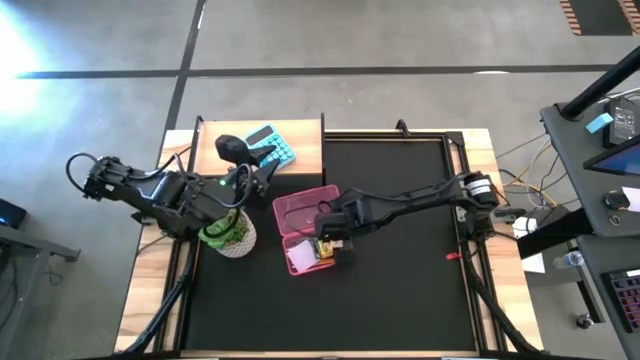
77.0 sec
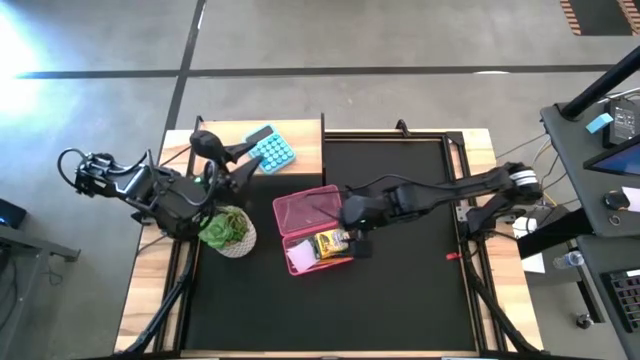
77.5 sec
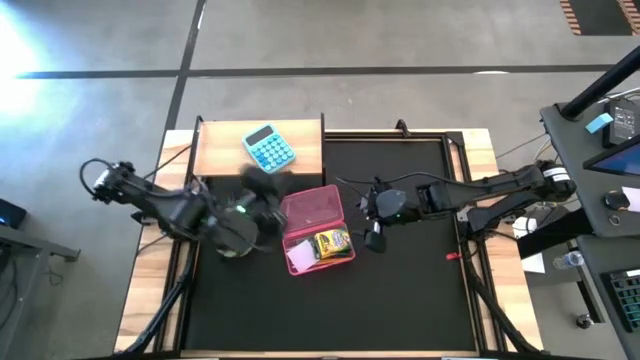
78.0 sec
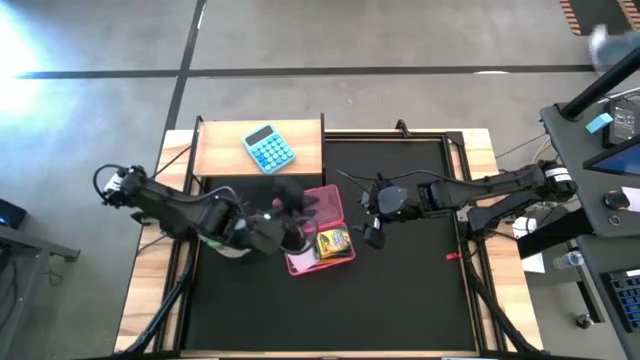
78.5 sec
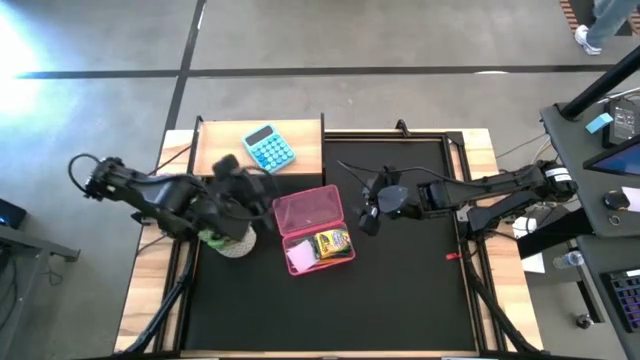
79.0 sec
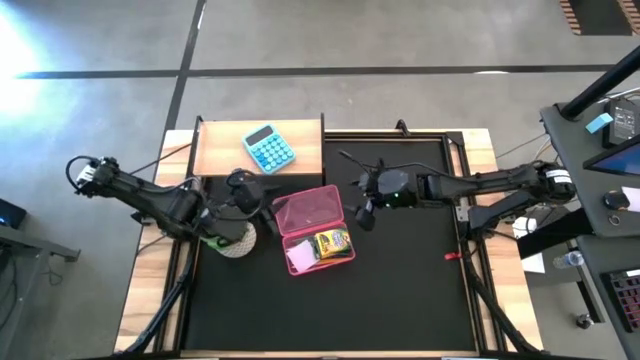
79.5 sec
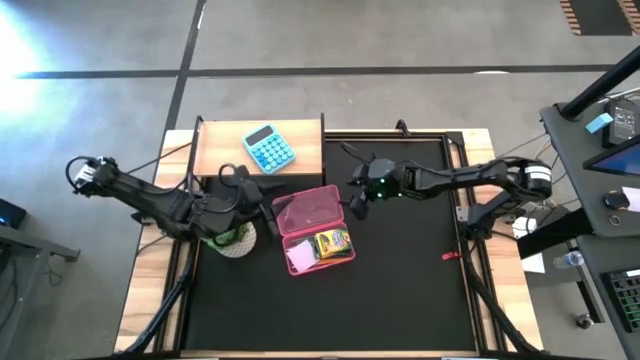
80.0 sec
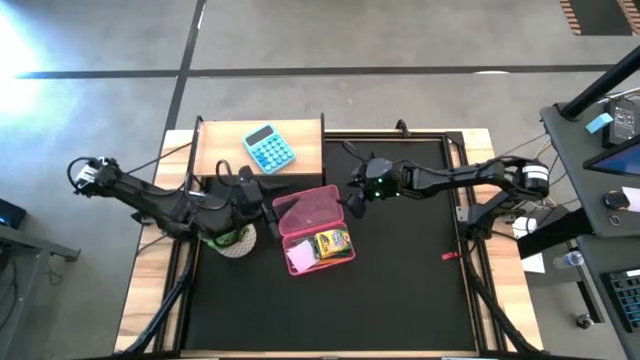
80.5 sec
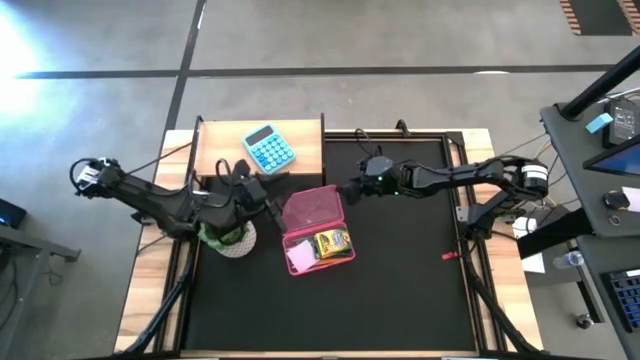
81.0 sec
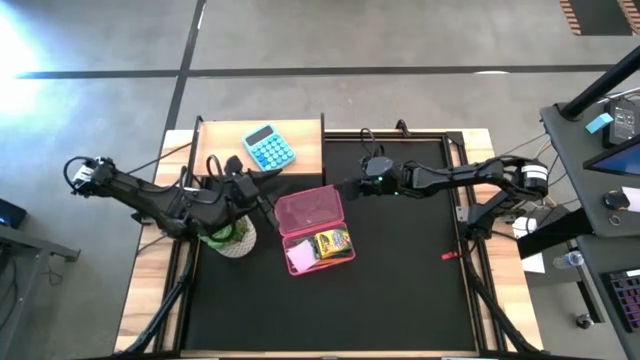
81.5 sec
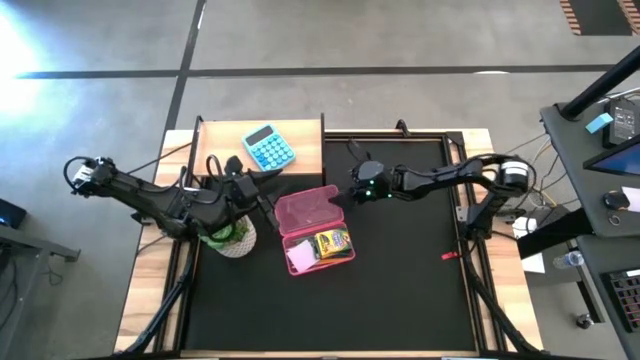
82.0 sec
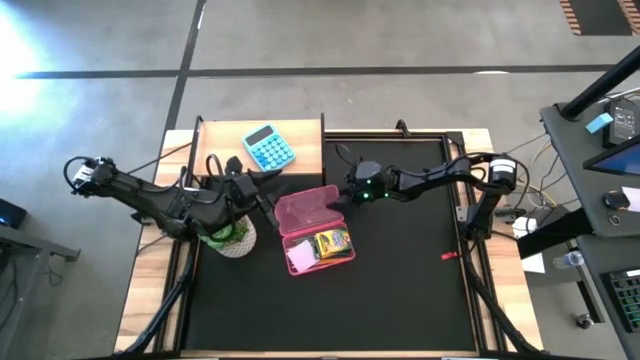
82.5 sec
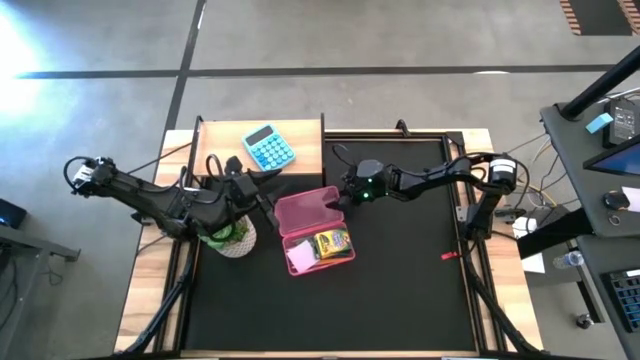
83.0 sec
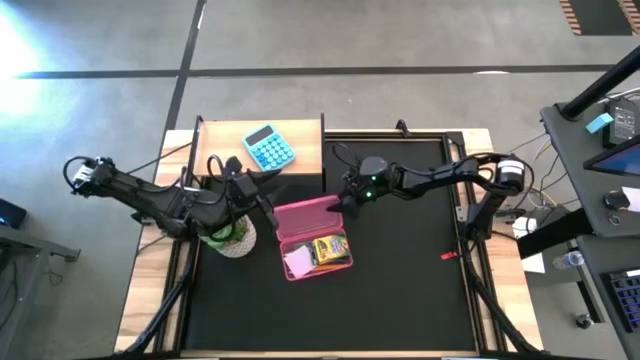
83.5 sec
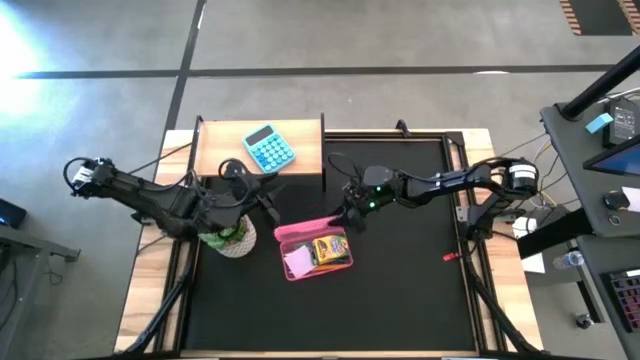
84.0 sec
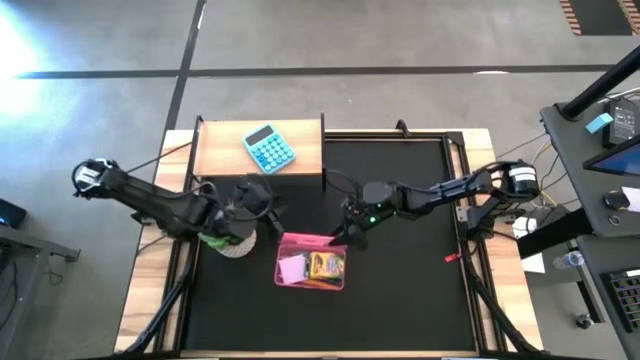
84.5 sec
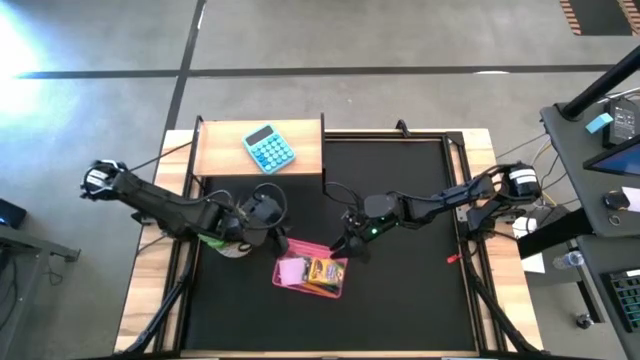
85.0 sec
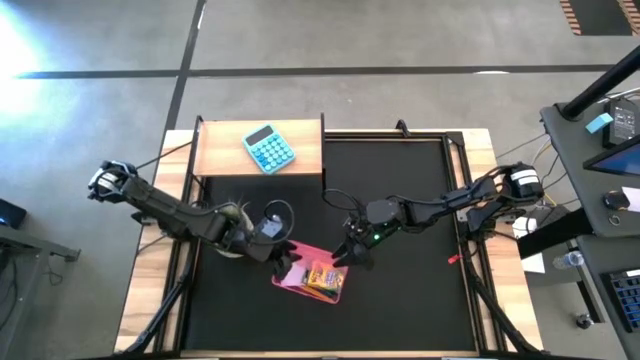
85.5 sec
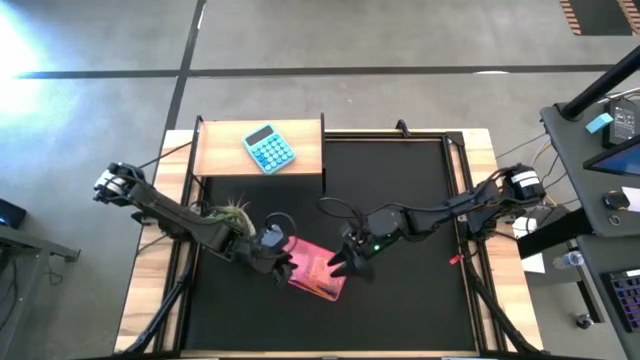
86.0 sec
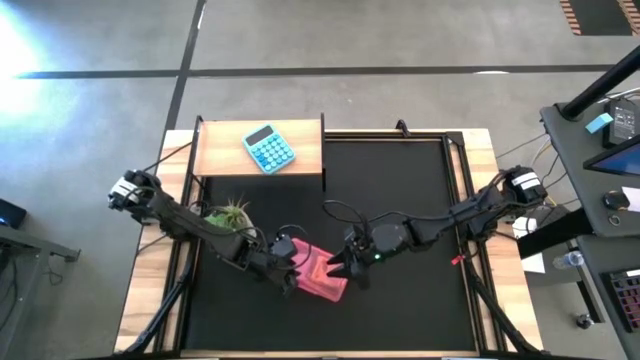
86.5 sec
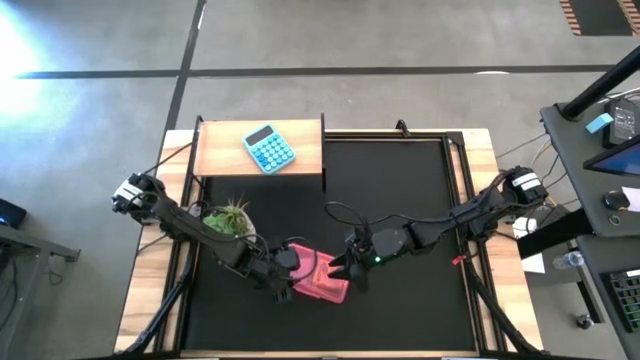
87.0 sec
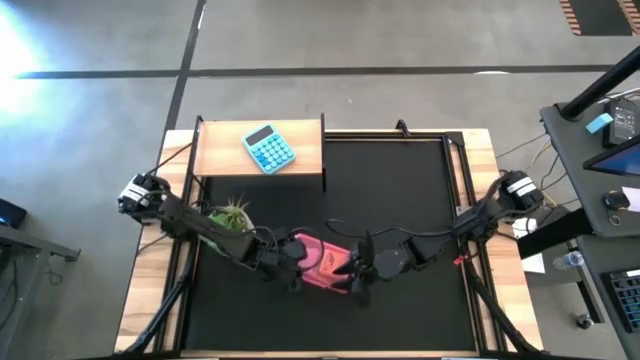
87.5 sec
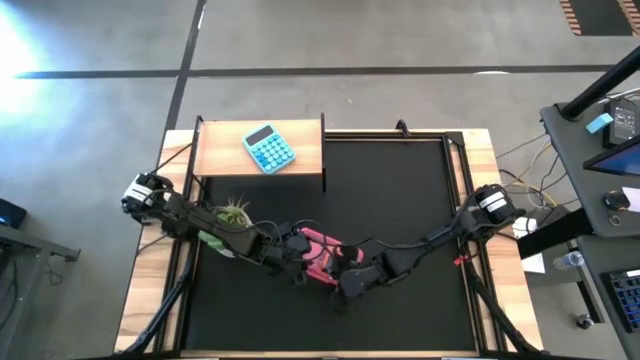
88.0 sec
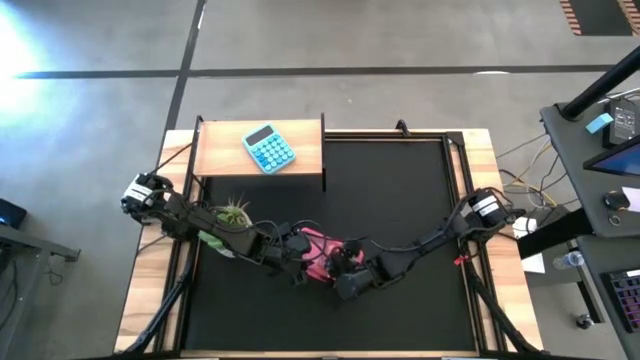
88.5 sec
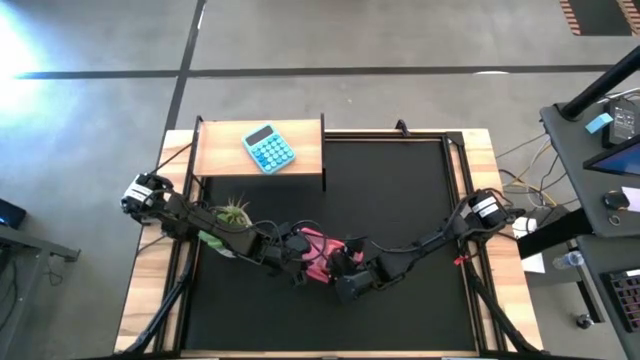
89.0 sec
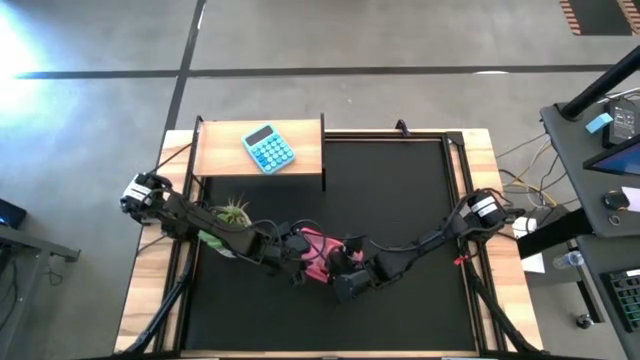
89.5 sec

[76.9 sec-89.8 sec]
Task: Pack school essentials
Close the pink box

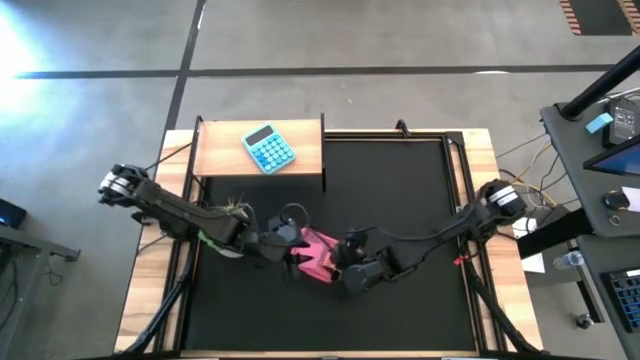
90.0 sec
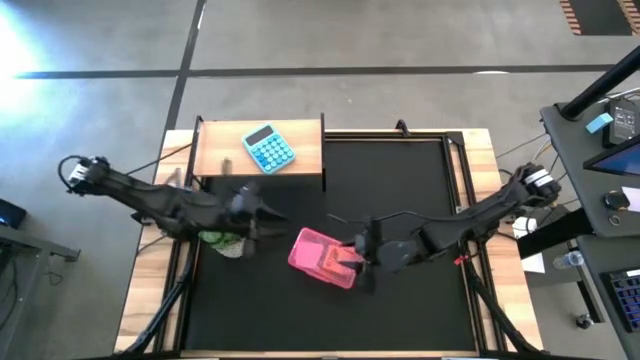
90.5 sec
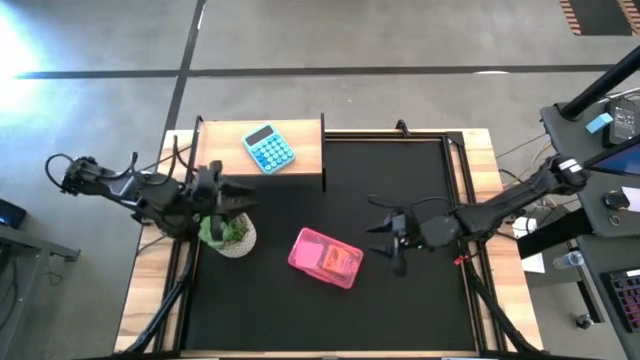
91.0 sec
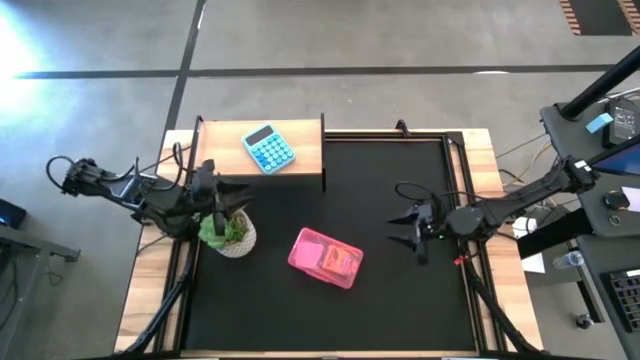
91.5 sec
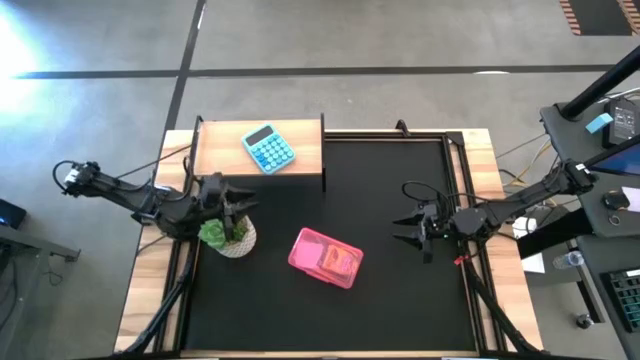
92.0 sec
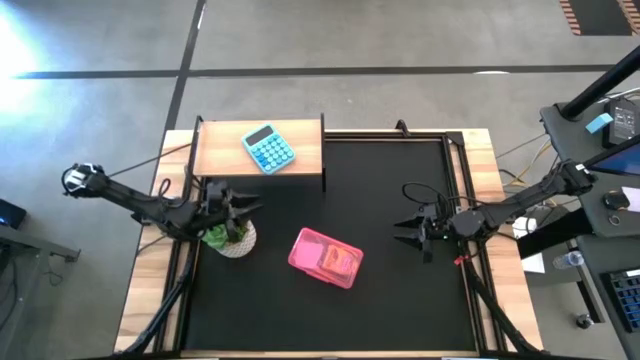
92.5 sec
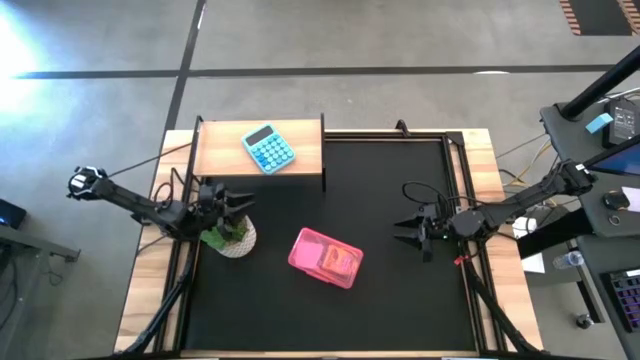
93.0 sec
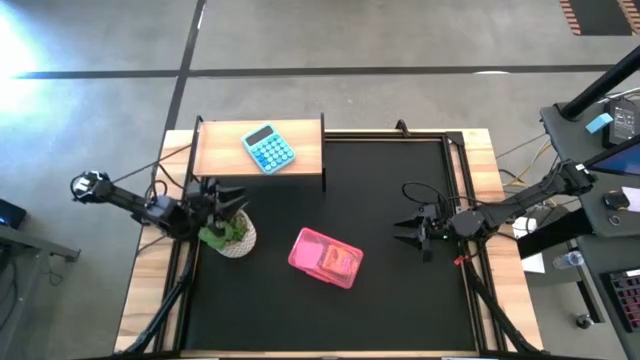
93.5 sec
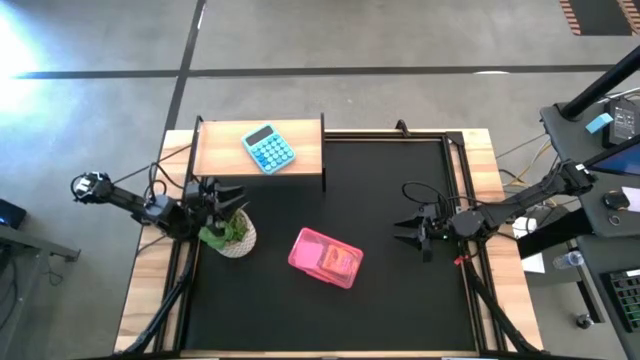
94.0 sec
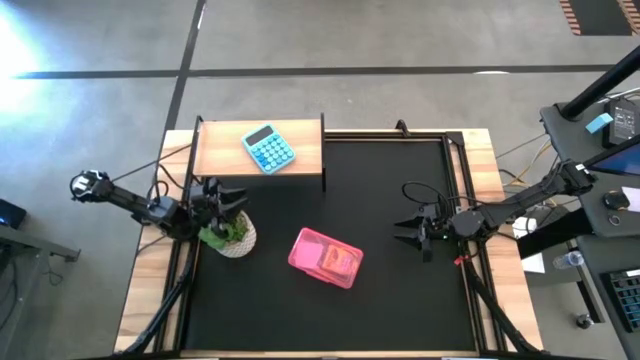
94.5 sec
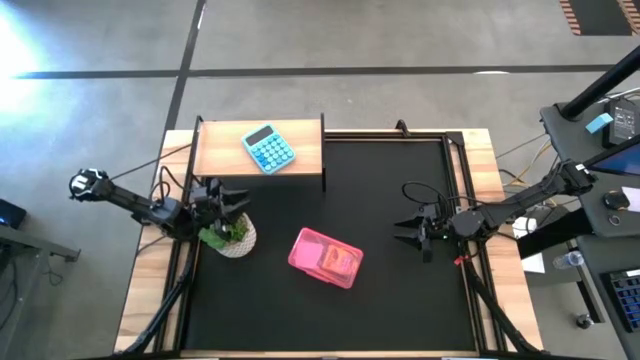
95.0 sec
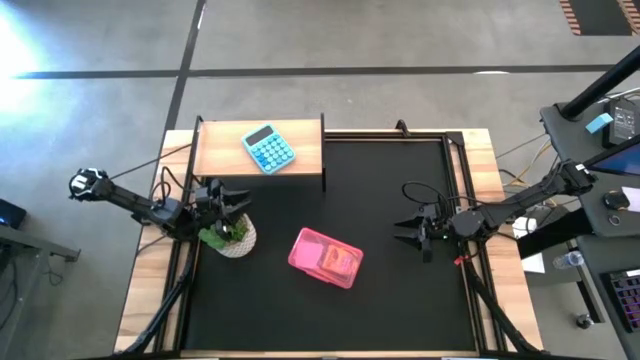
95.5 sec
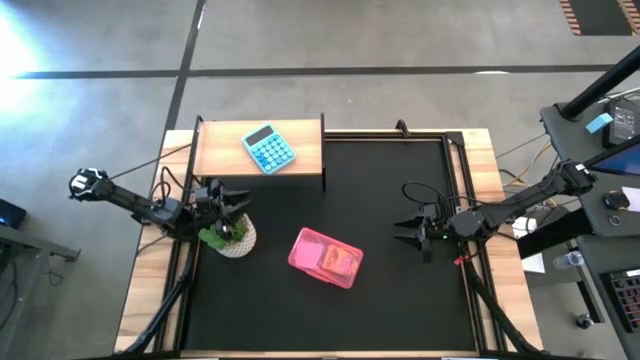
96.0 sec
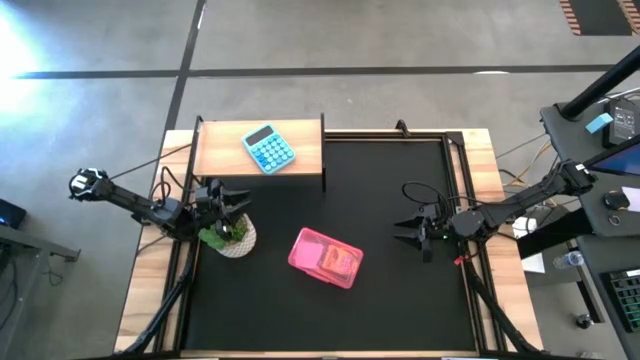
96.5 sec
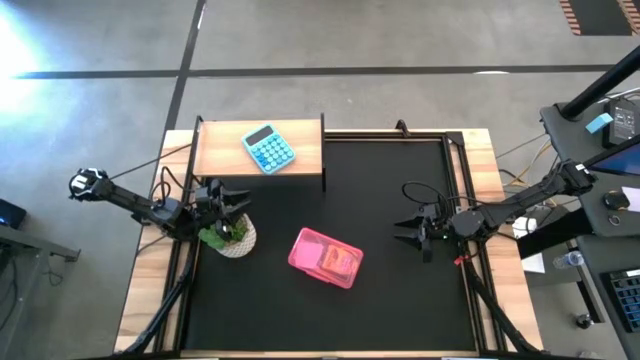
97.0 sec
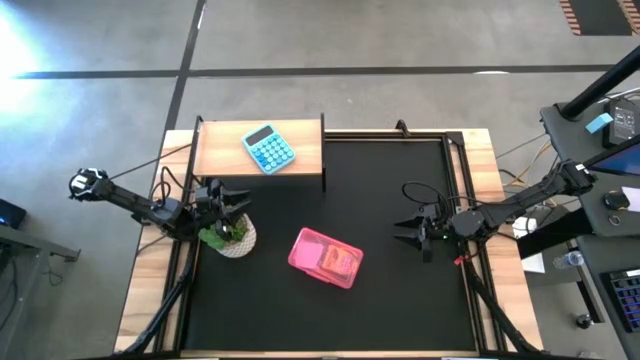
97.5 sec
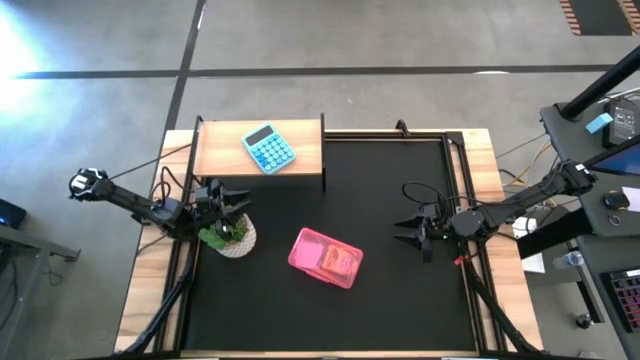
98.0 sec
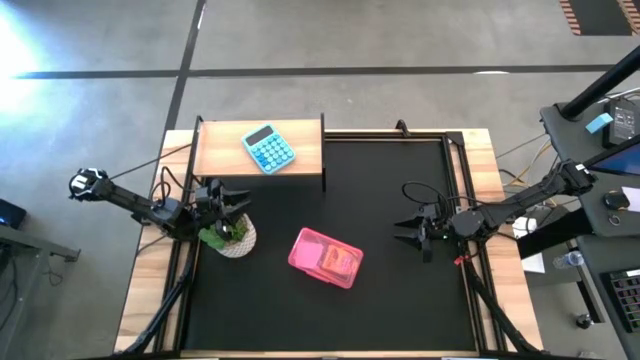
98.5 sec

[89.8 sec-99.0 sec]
Return to Home Position

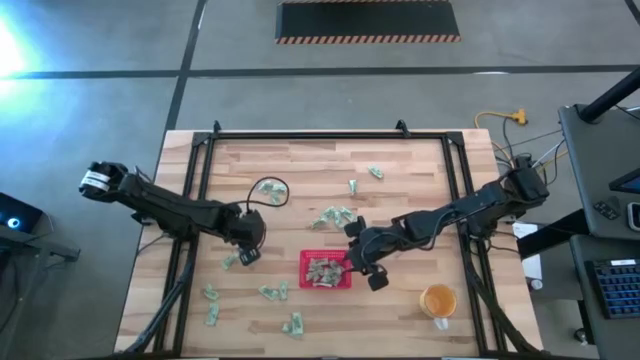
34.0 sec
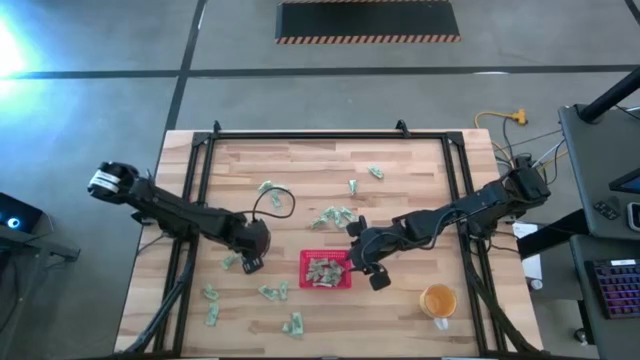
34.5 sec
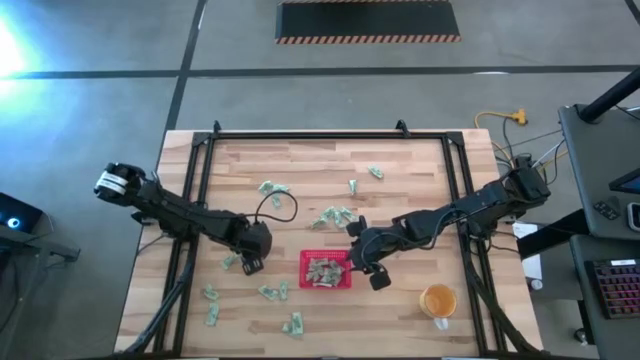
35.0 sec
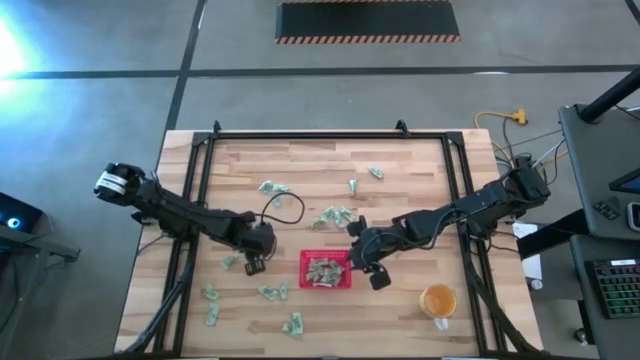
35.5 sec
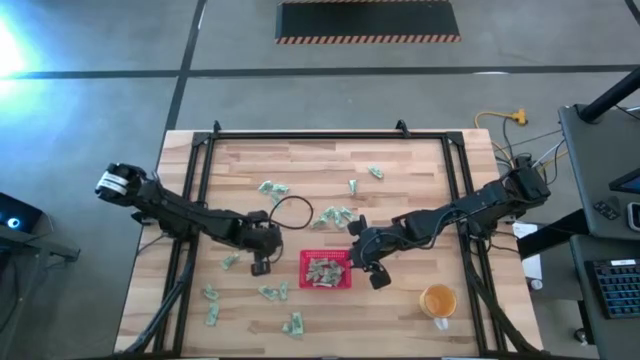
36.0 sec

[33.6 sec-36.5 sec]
Task: Pick and place Stevia / Truvia into bins
Put the white stevia packet into the red bin
